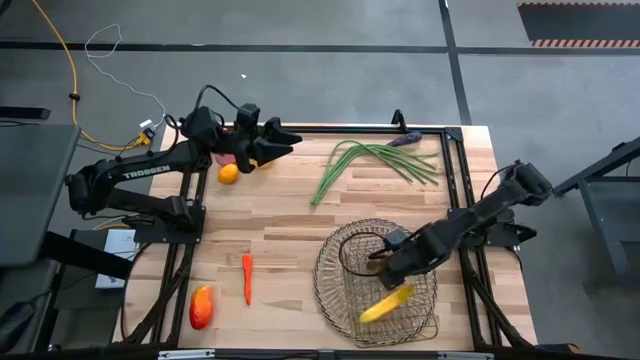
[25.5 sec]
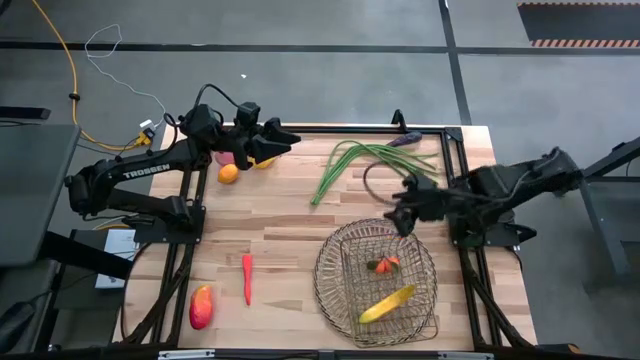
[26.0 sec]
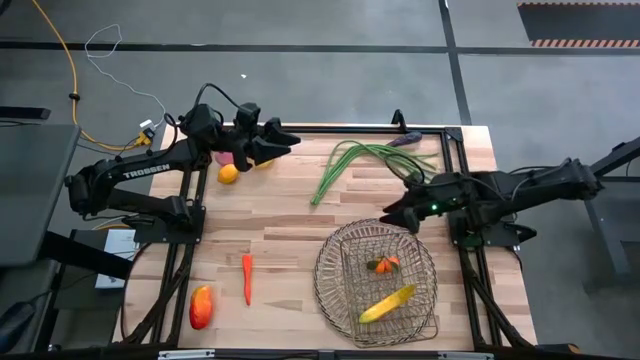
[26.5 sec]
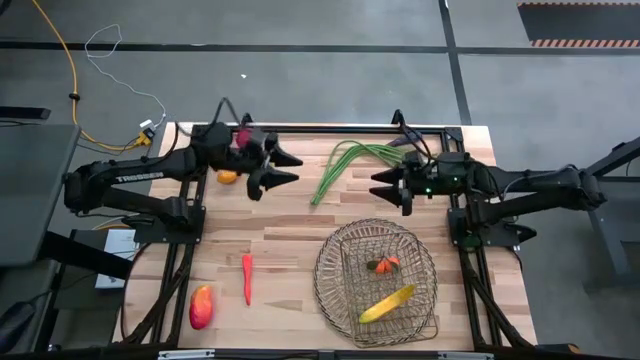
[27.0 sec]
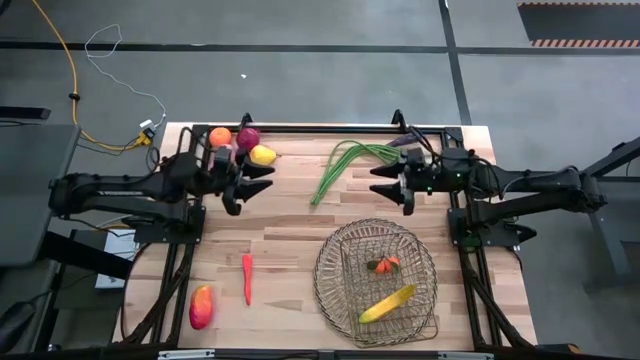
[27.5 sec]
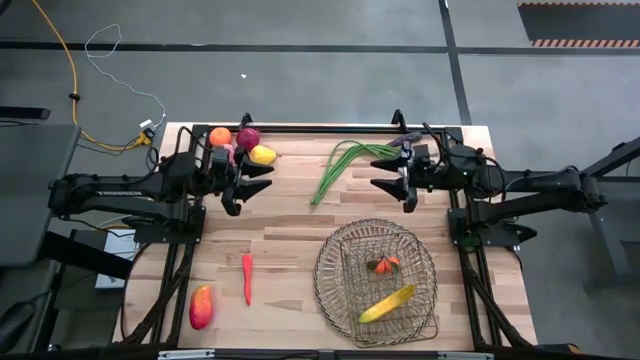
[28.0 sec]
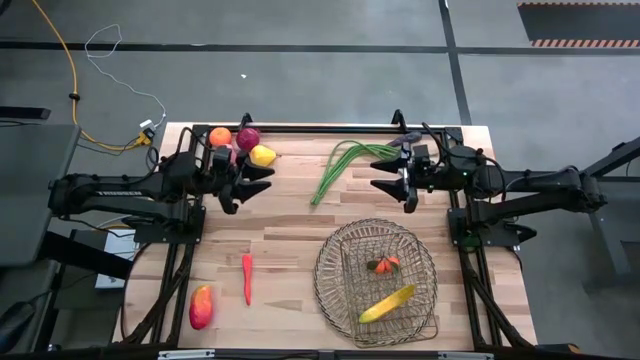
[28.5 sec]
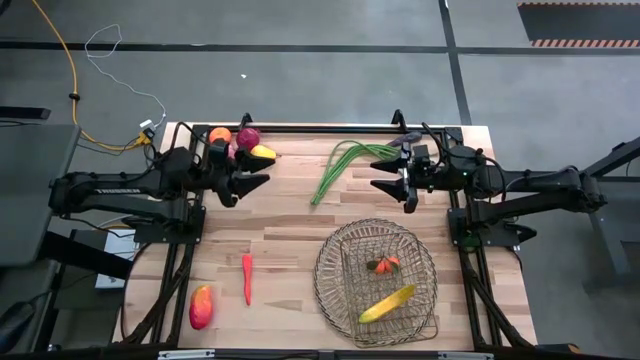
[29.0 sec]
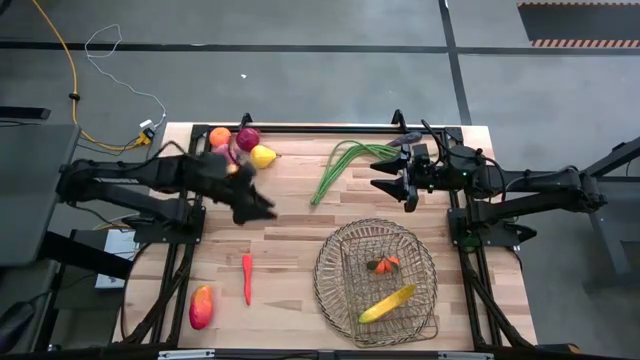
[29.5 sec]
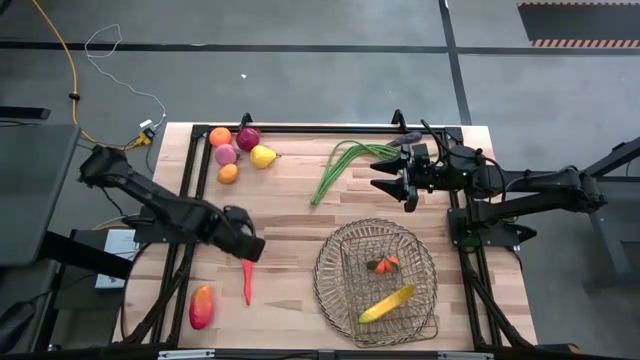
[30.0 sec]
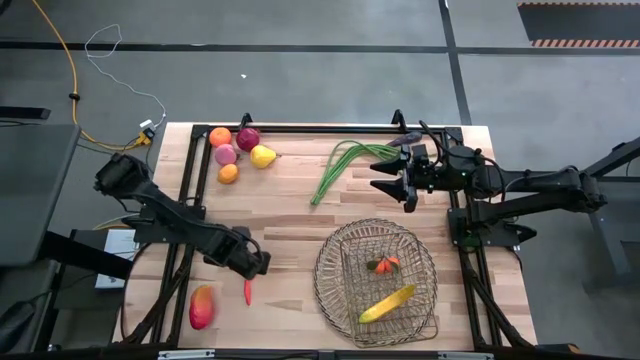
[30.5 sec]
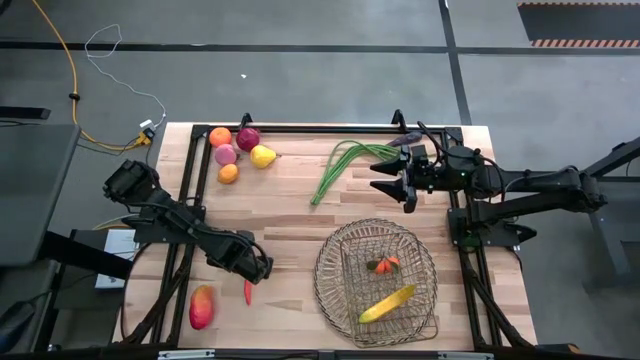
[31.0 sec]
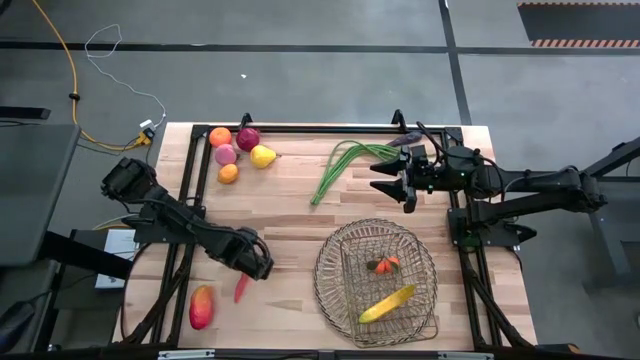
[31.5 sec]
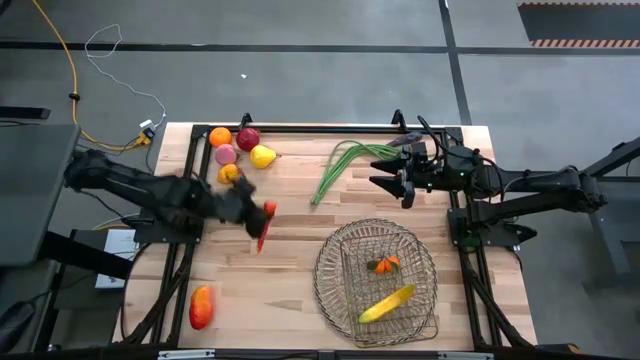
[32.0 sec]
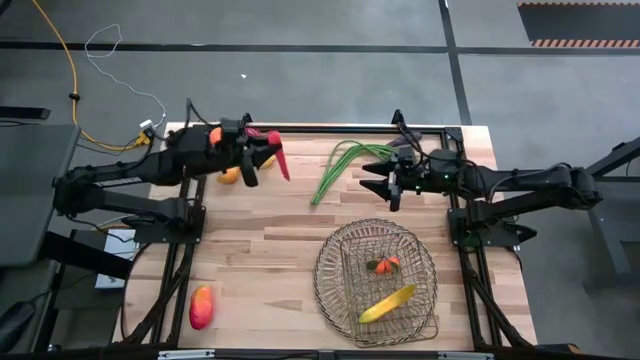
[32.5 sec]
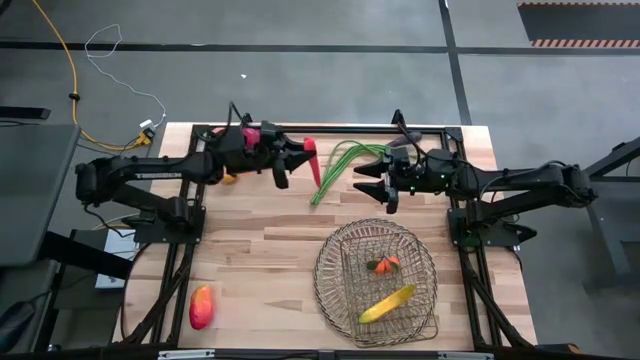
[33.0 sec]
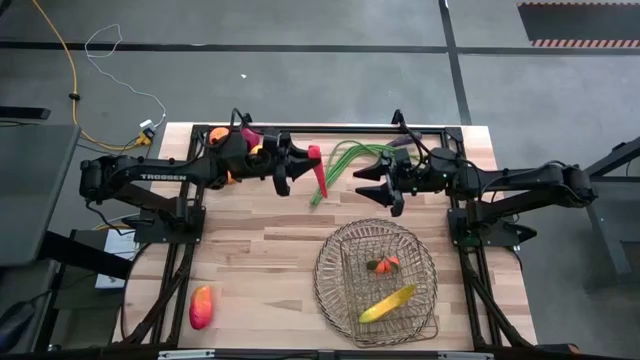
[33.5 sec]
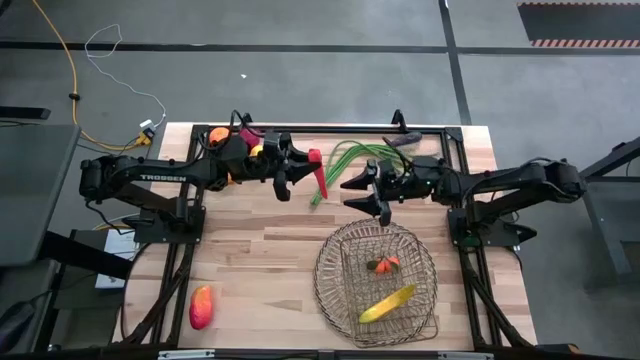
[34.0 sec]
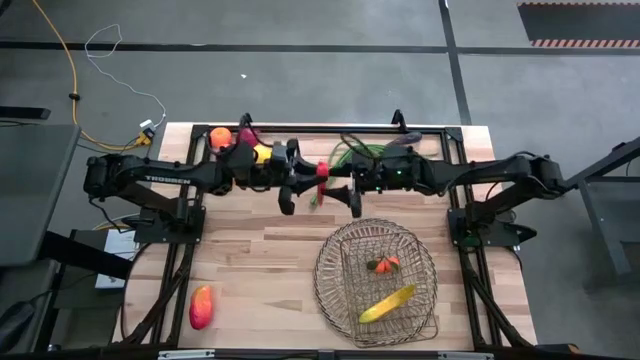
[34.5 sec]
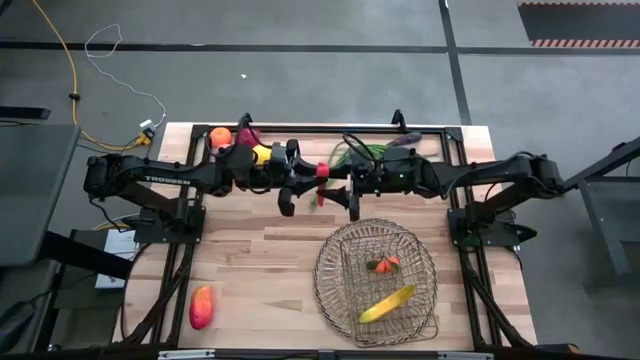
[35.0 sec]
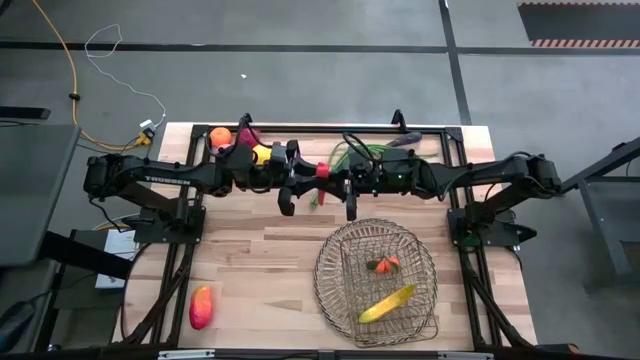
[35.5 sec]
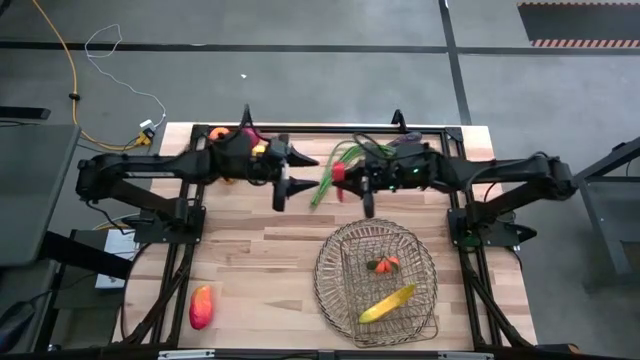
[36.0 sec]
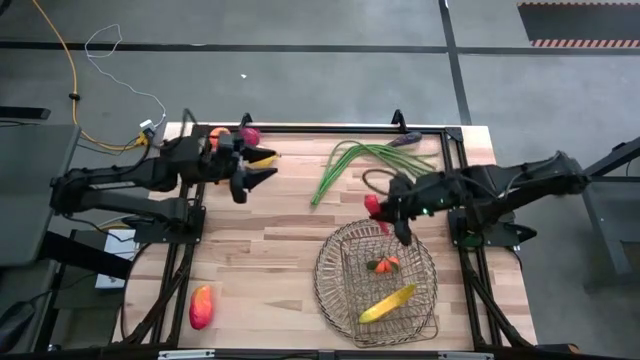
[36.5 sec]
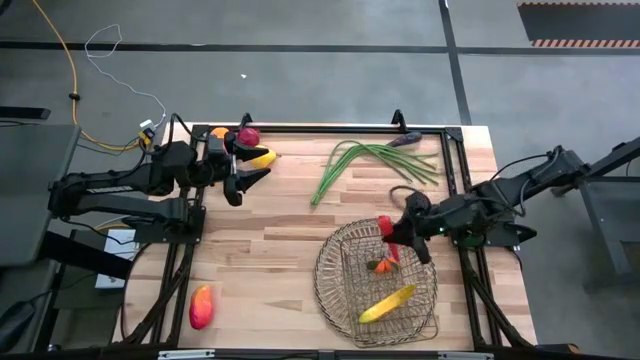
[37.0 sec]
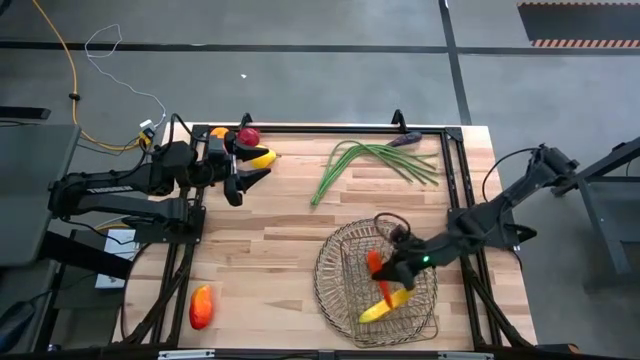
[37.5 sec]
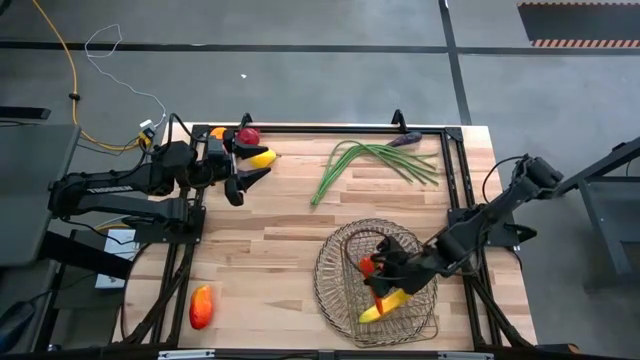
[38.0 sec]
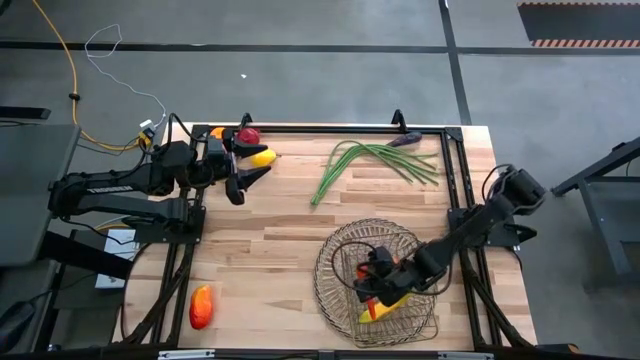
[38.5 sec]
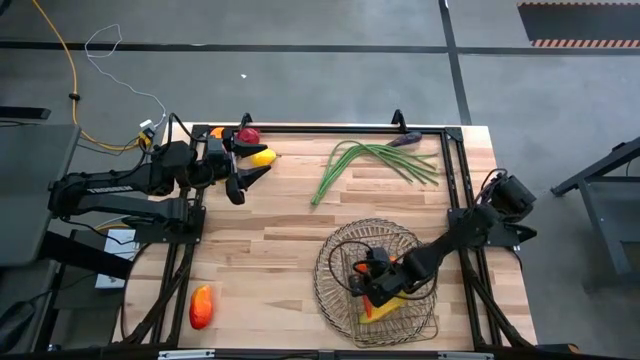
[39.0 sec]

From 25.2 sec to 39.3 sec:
Task: Build produce basket
Put the carrot into the wire basket

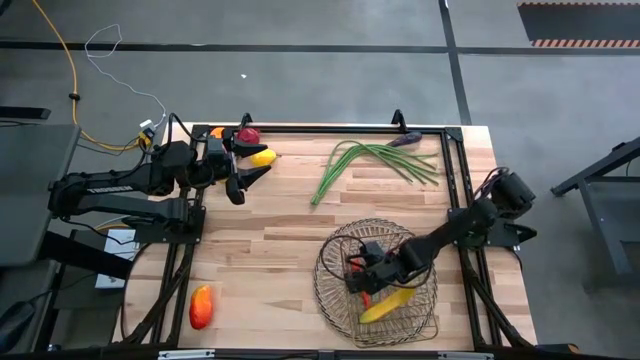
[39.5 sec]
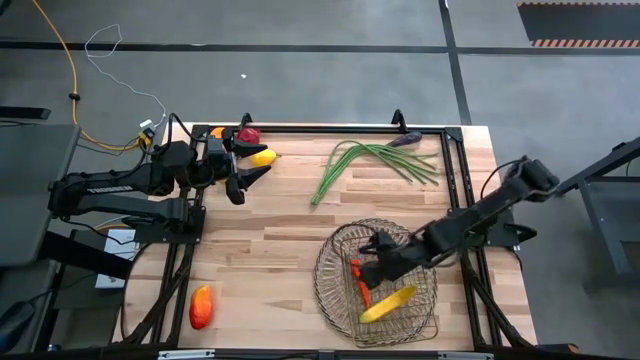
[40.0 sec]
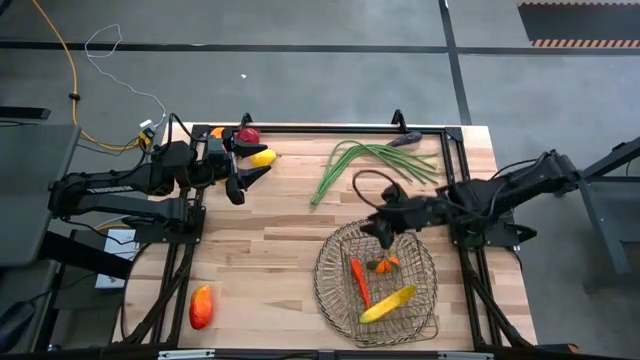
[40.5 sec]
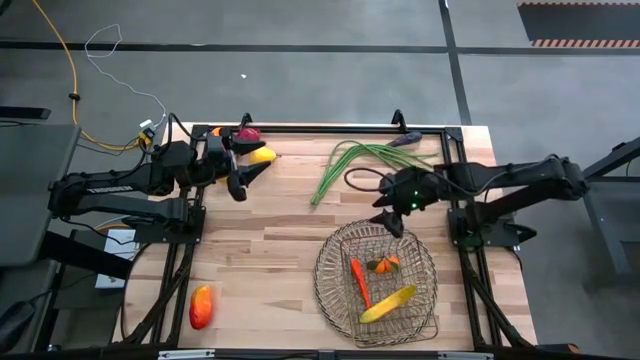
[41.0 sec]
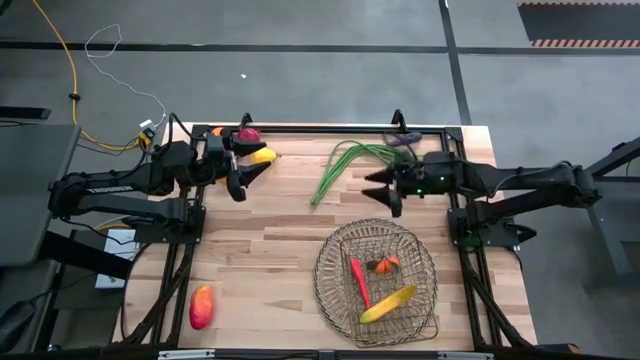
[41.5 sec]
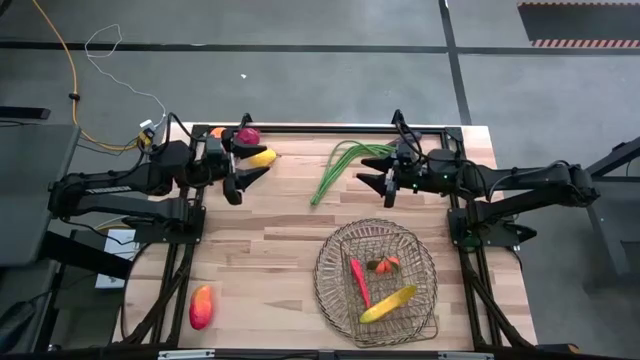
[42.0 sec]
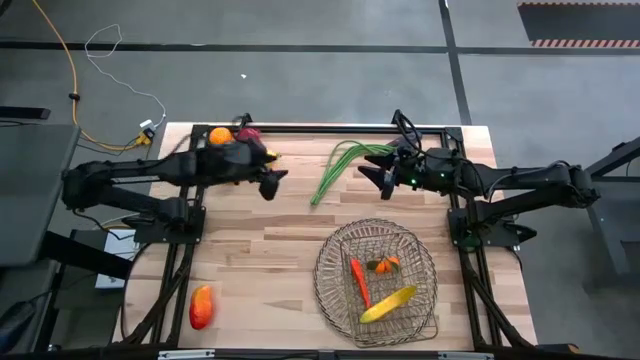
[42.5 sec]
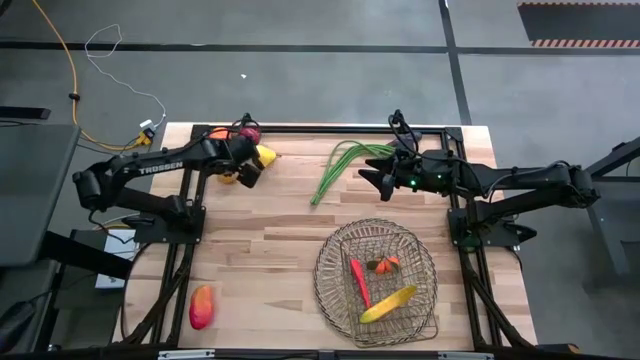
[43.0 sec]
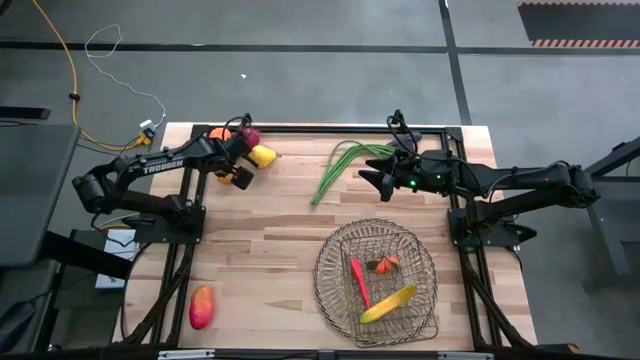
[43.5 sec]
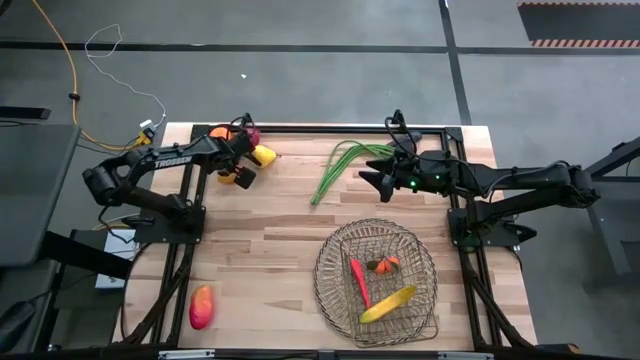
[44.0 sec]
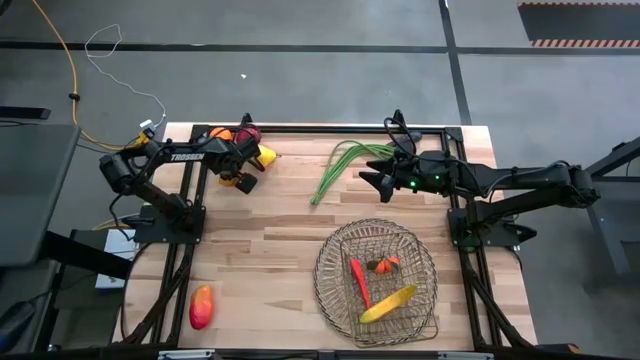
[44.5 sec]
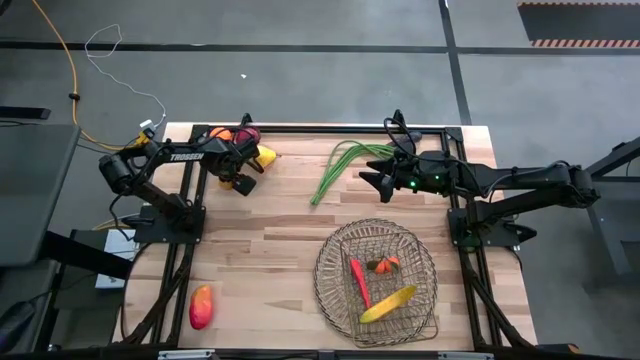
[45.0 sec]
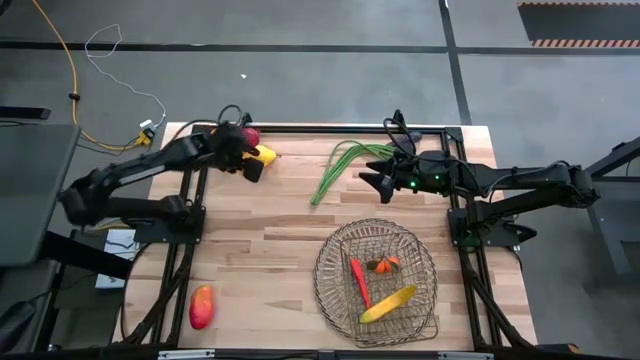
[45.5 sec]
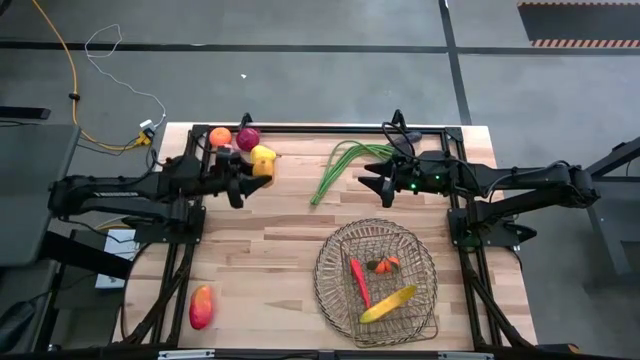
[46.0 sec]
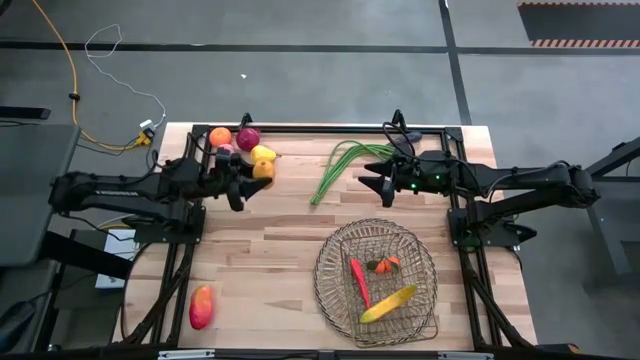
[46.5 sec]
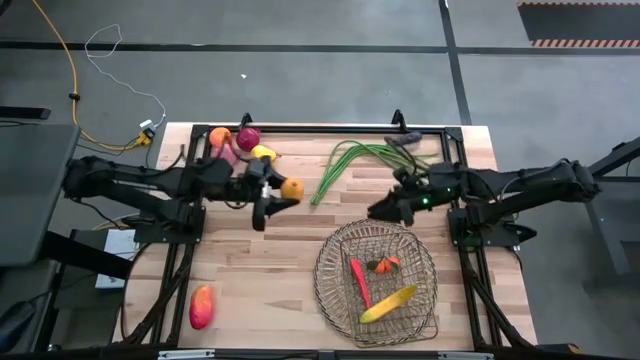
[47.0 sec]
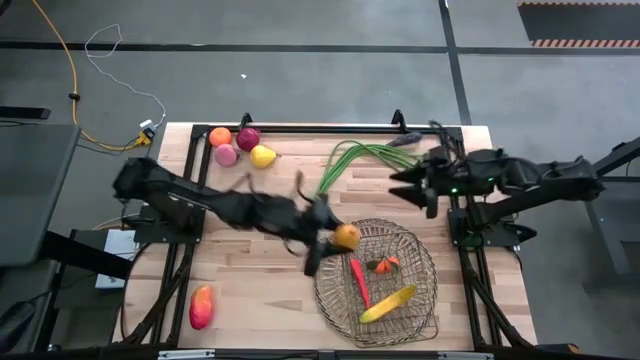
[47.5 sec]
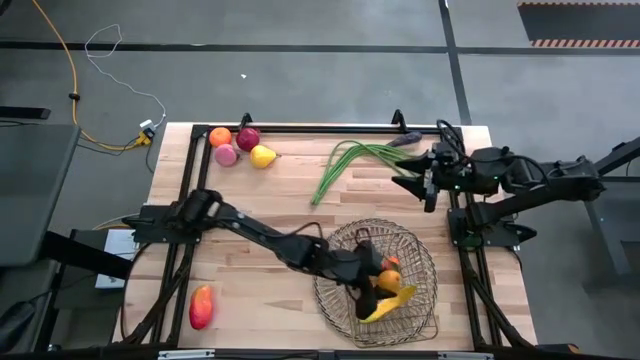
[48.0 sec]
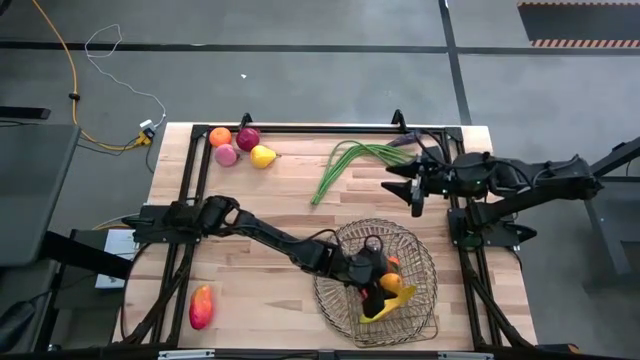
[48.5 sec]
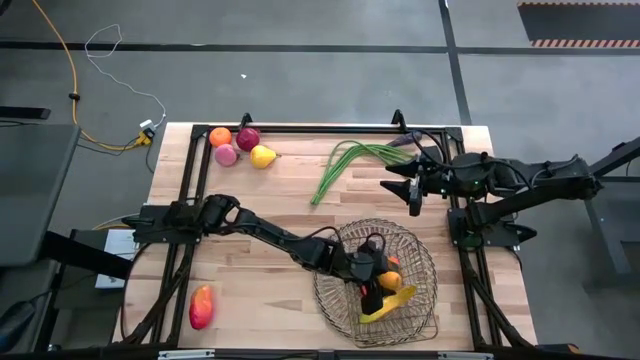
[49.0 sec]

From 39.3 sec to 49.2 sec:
Put the lemon into the wire basket
